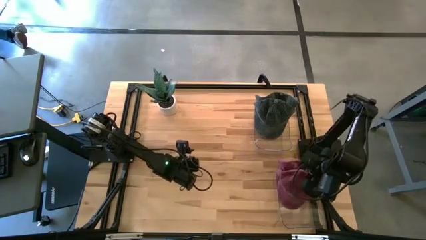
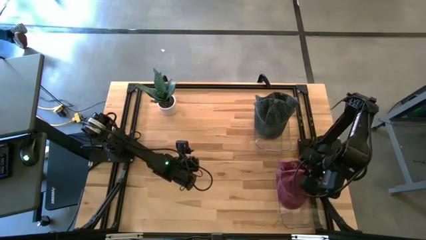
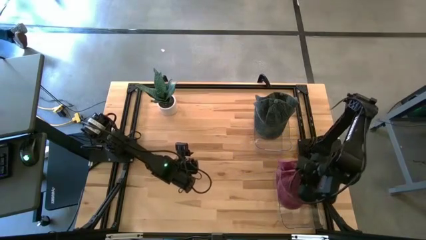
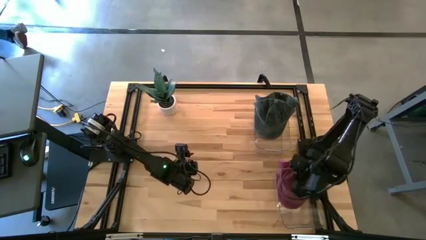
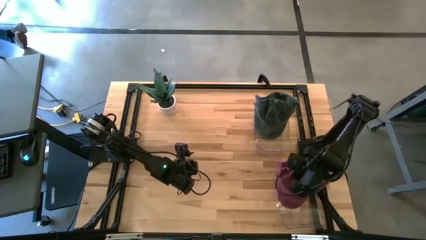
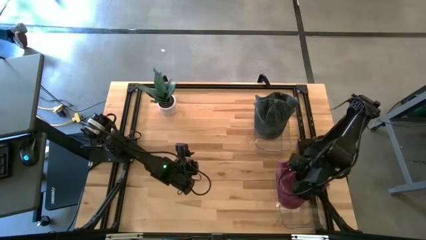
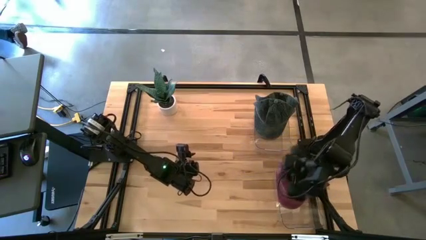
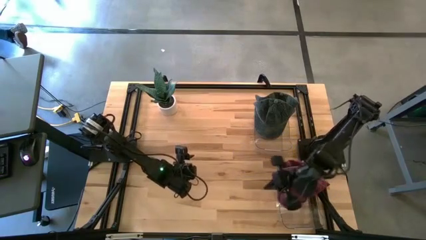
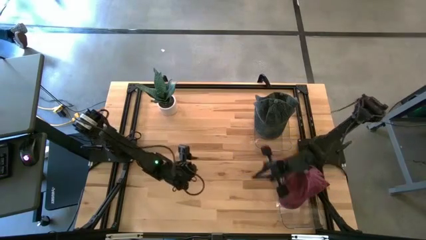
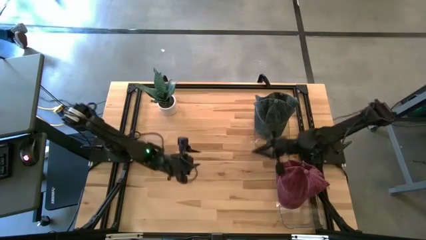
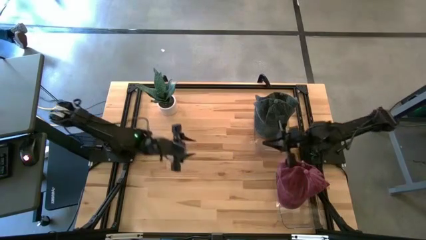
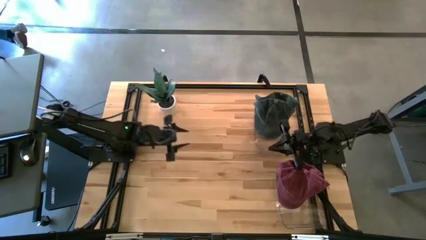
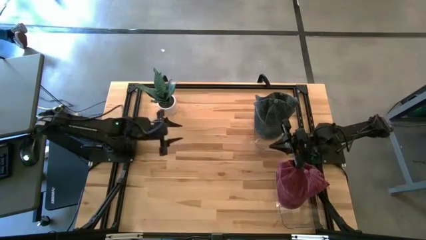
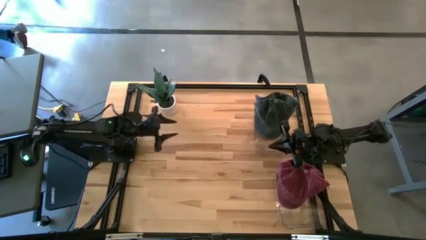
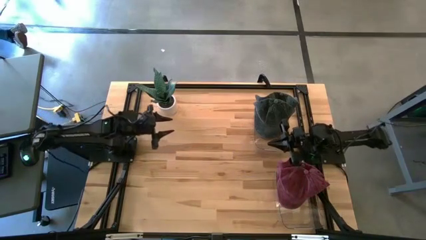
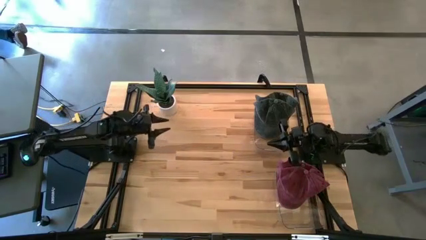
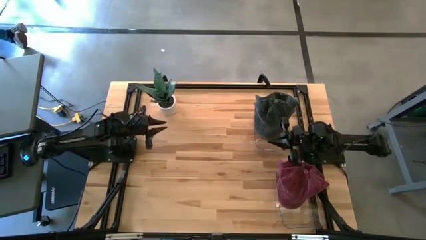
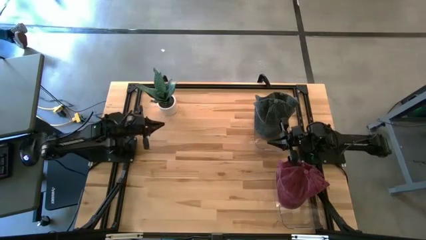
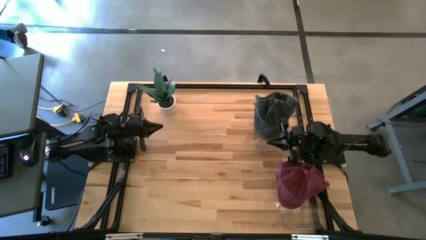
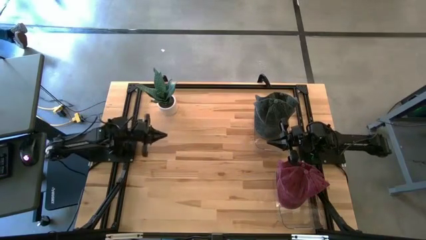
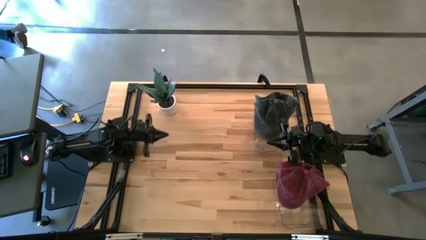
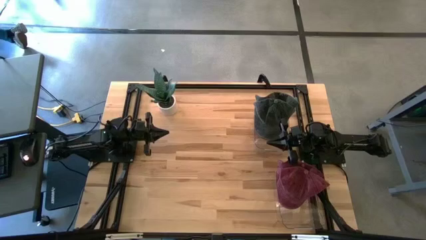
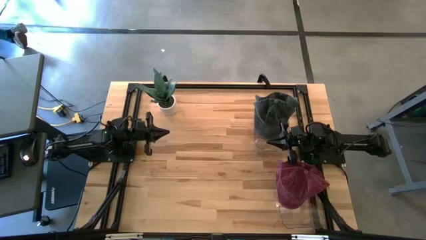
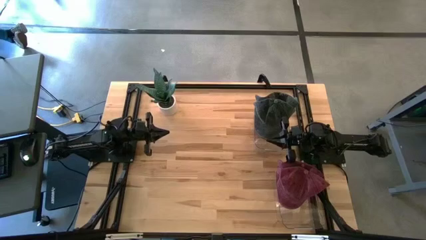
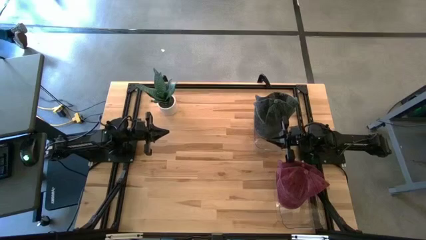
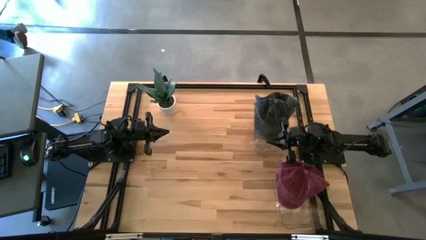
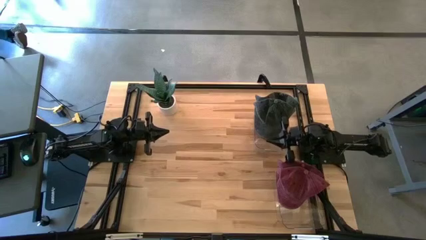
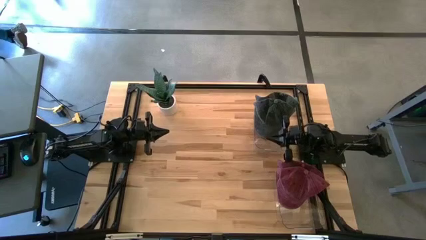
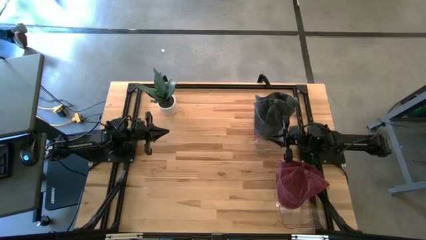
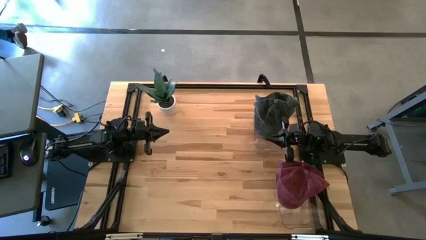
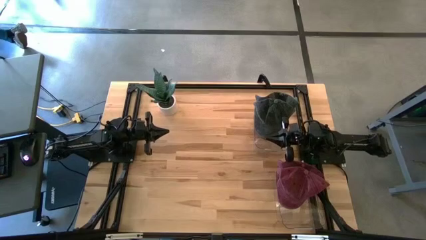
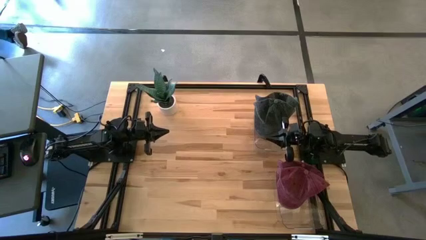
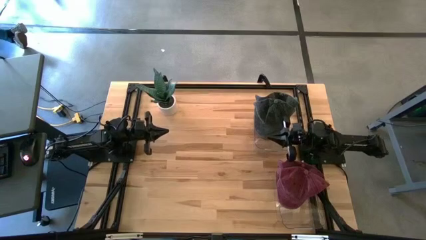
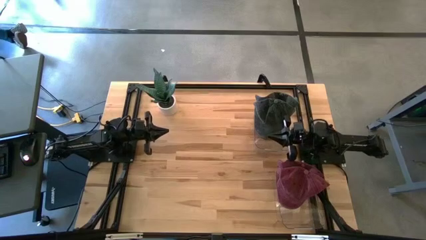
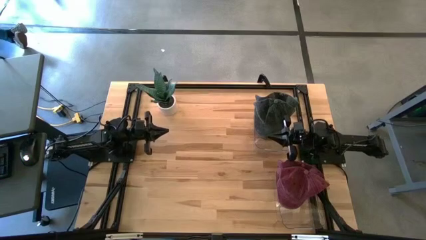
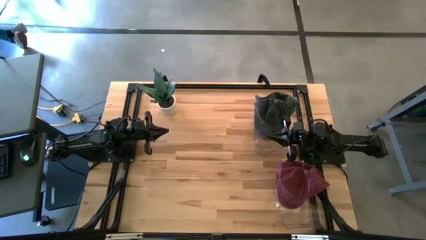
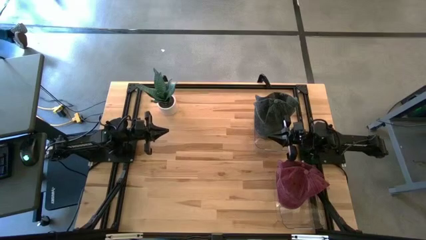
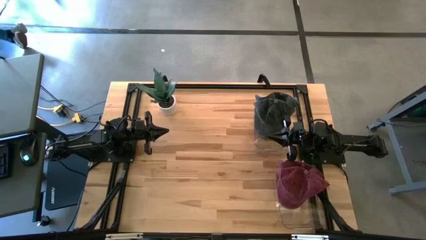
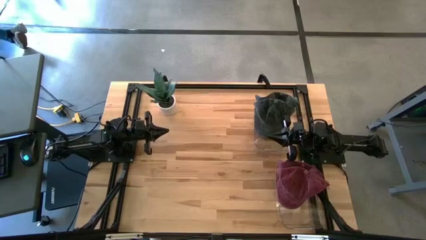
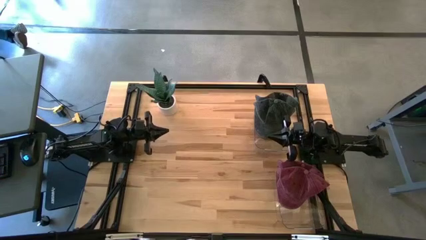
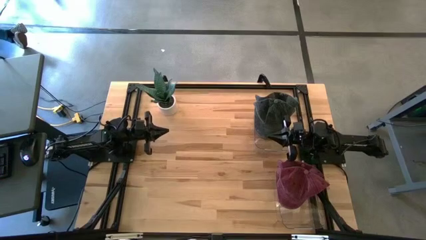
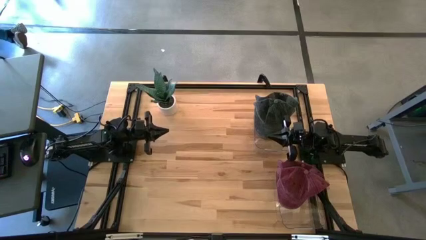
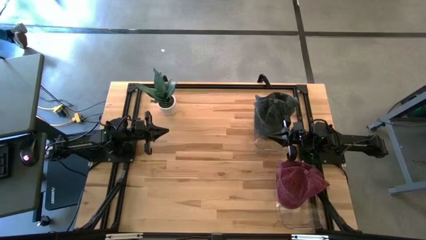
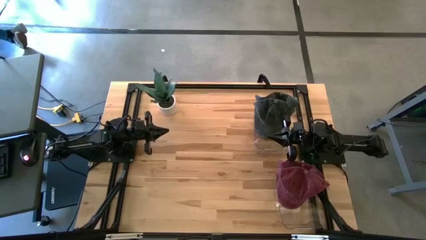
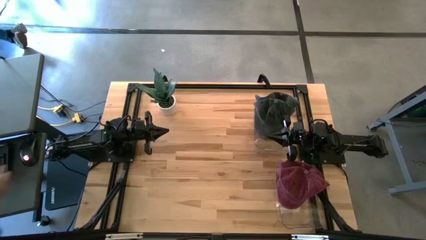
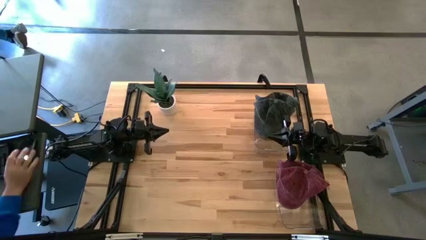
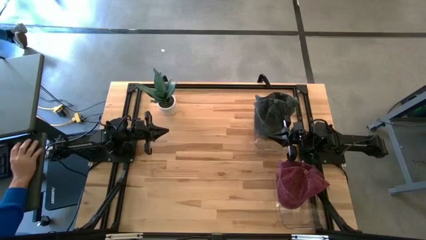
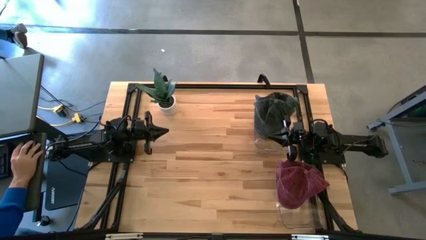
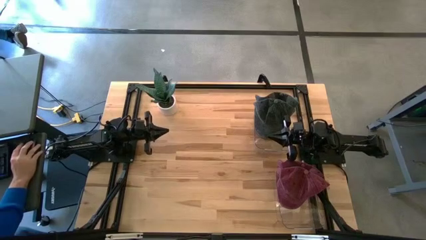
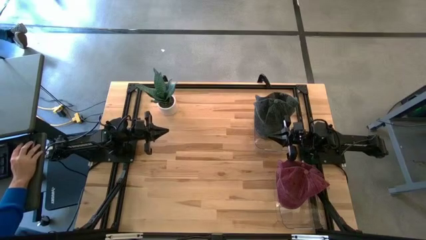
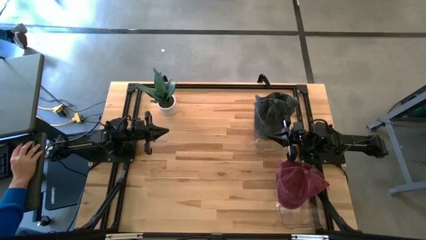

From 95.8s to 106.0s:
Task: Pick & Place hat
Return to Home Position

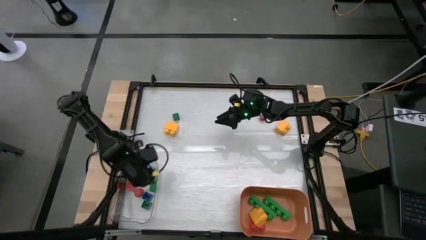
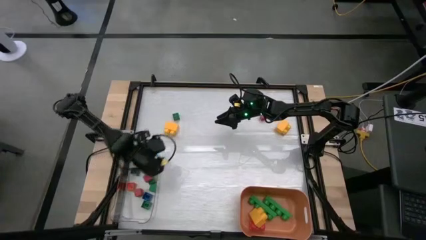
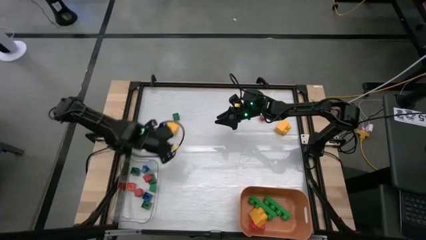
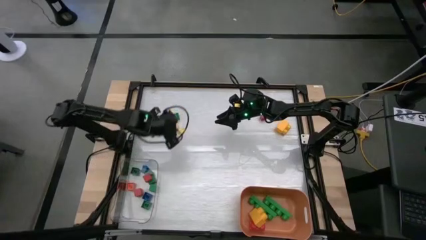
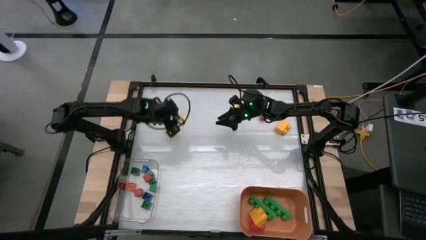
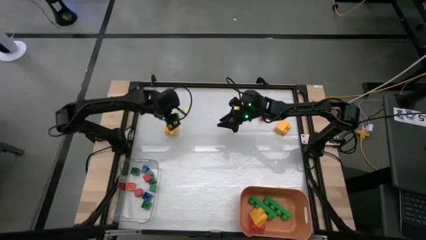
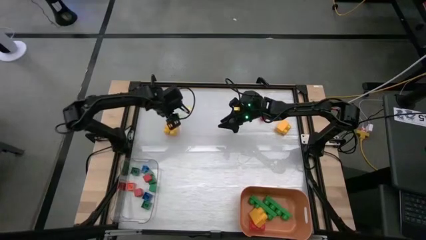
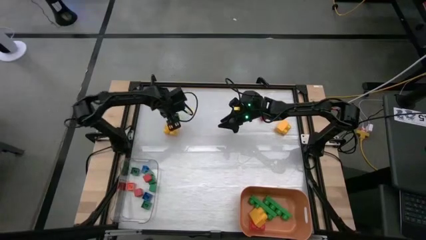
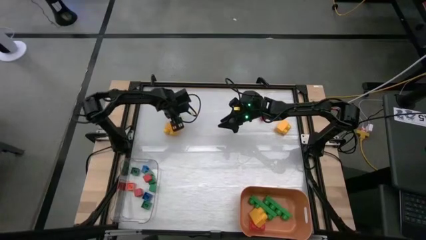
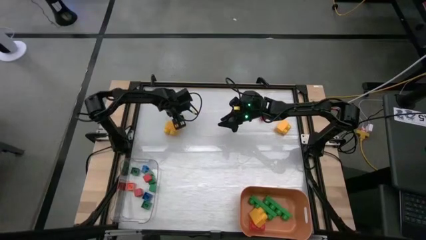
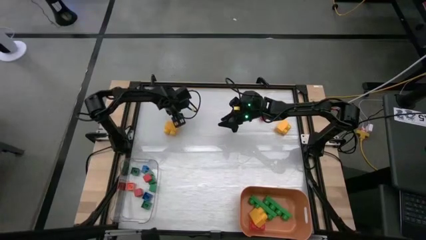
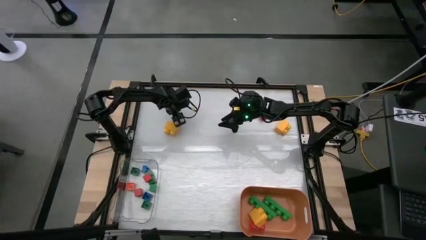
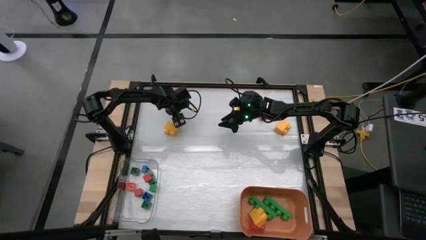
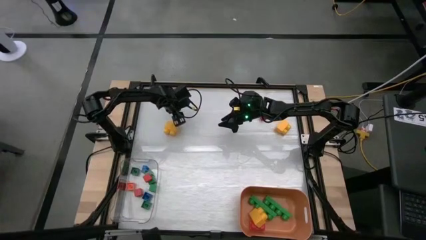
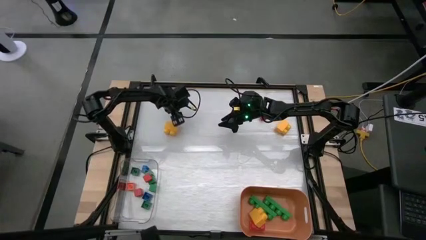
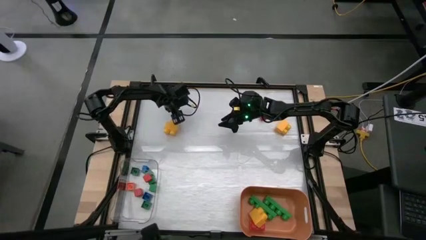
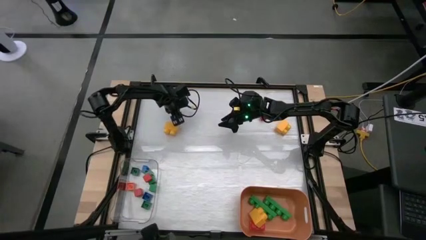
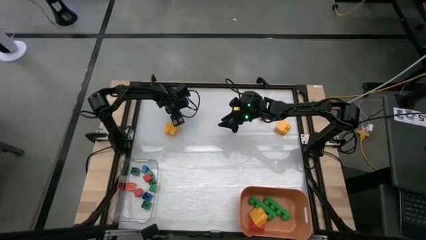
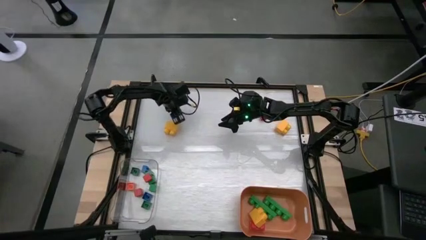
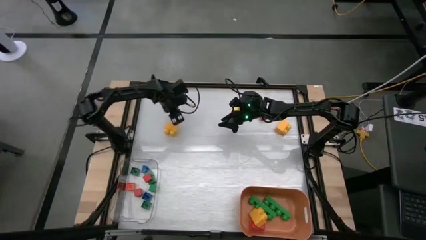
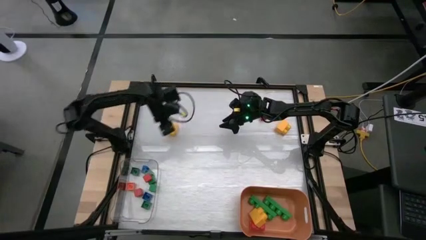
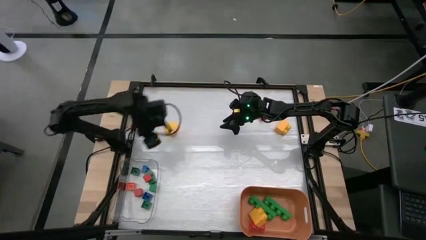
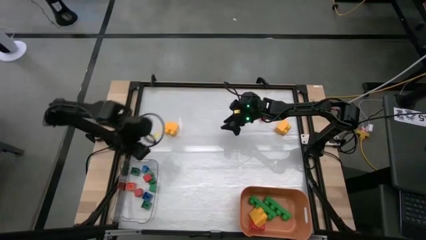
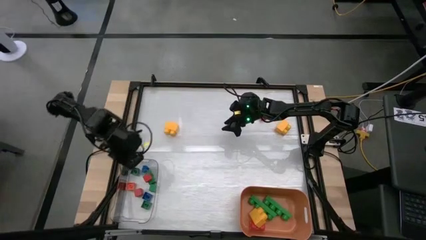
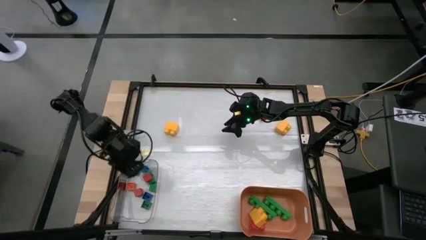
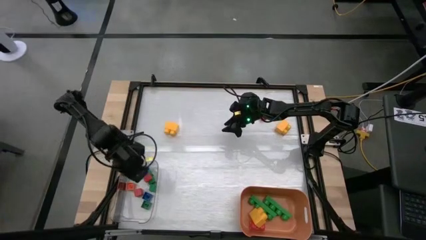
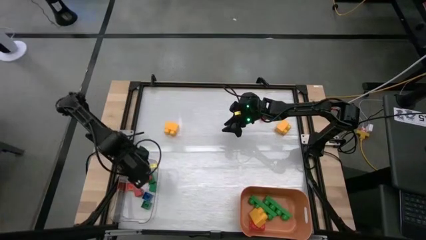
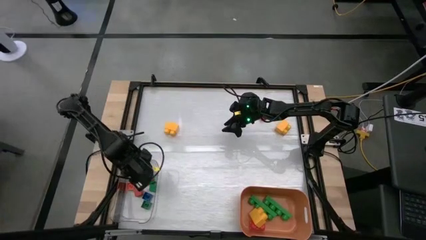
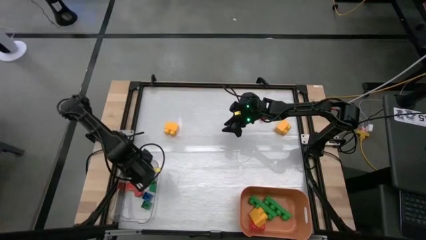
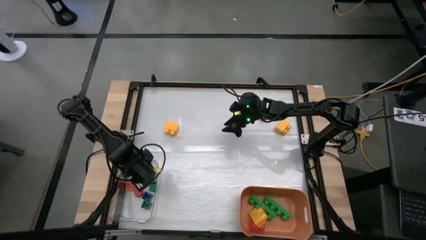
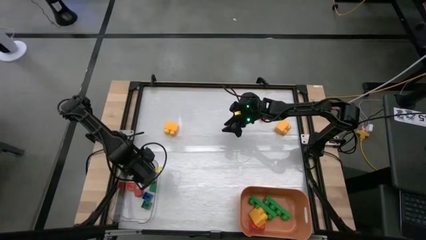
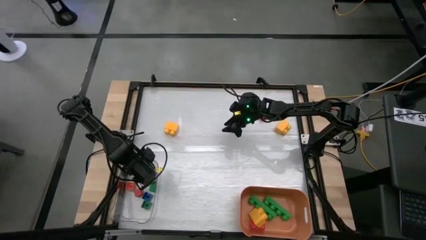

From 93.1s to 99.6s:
Task: Sort blocks by size
Put the small green game piece into the transparent bin

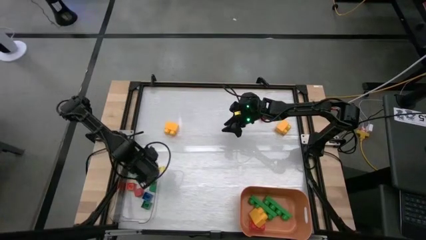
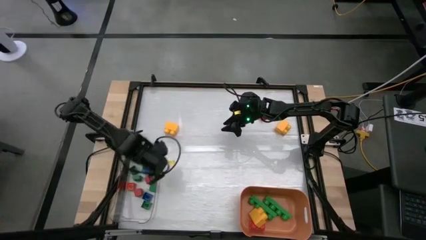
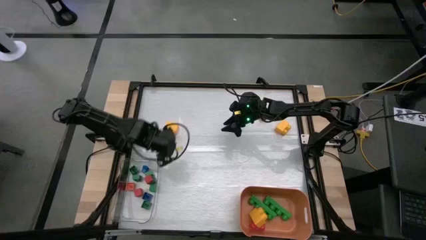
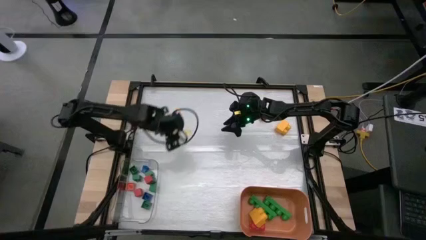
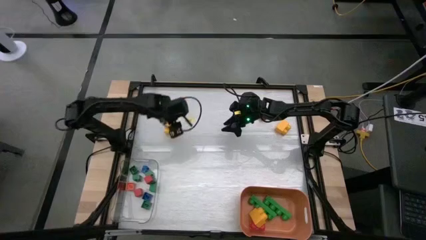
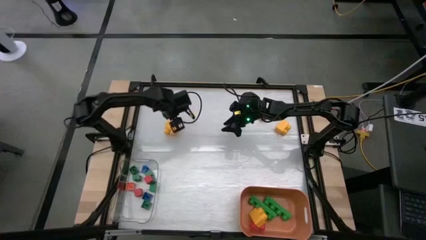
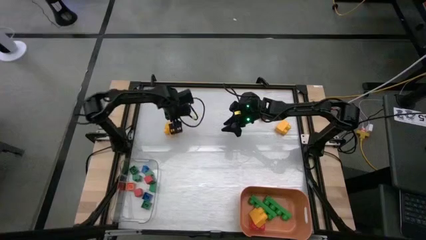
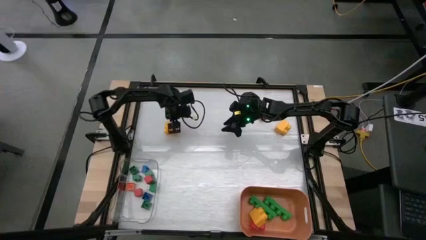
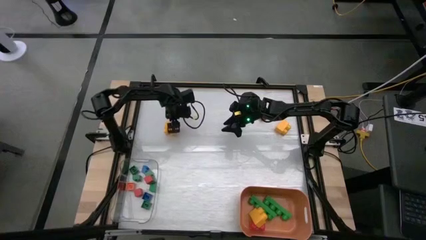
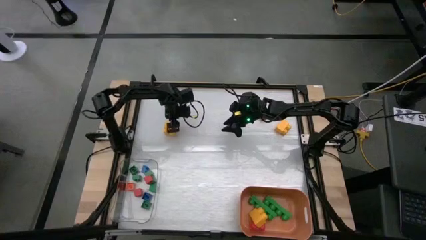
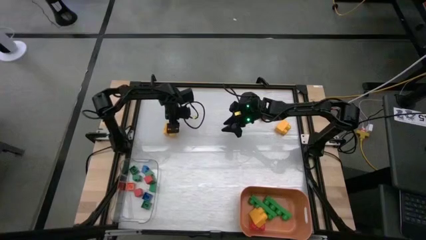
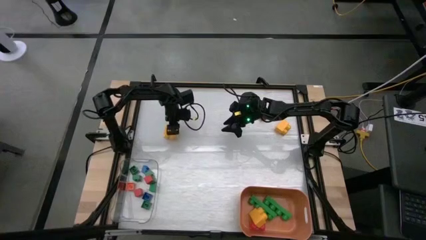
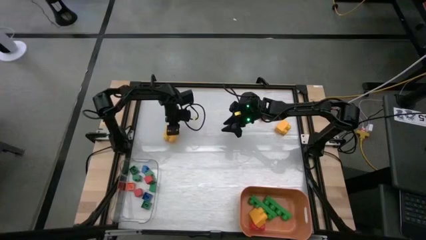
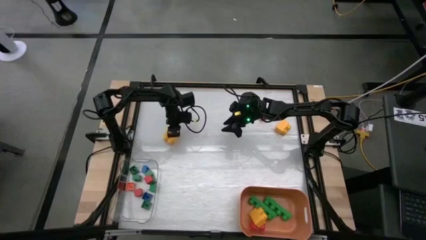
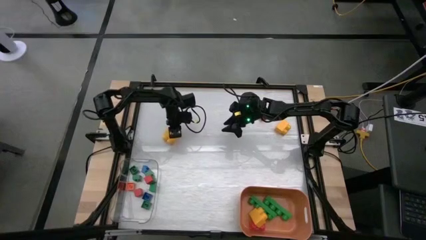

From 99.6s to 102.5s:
Put the big yellow game piece into the orange bin
